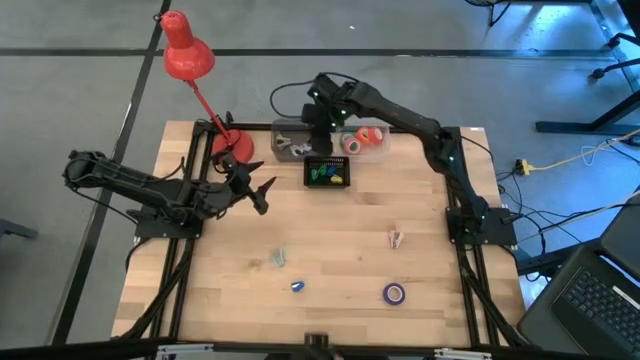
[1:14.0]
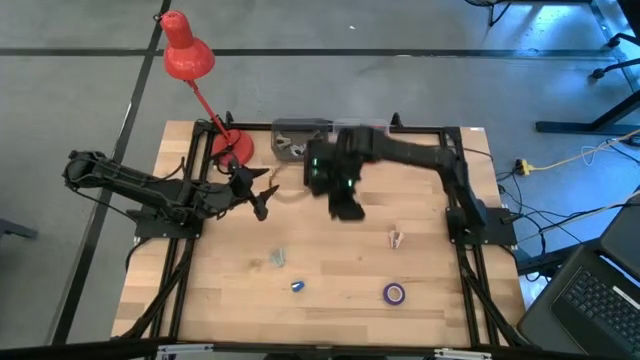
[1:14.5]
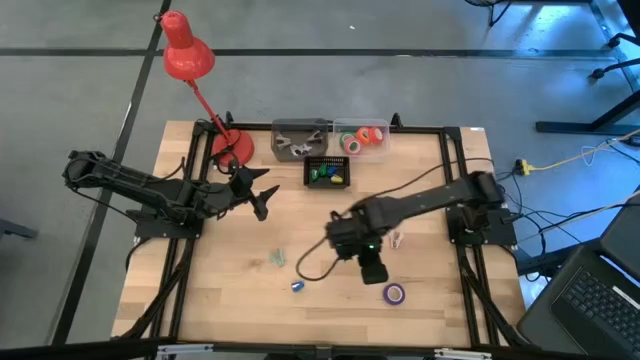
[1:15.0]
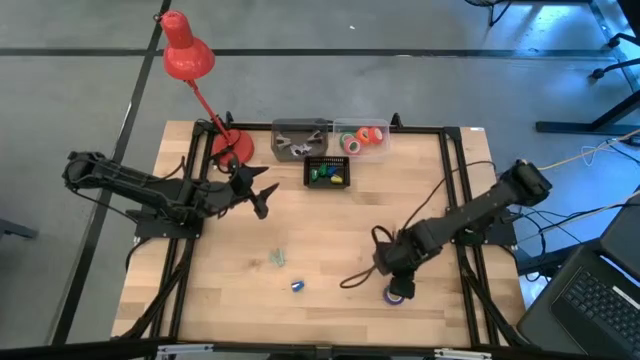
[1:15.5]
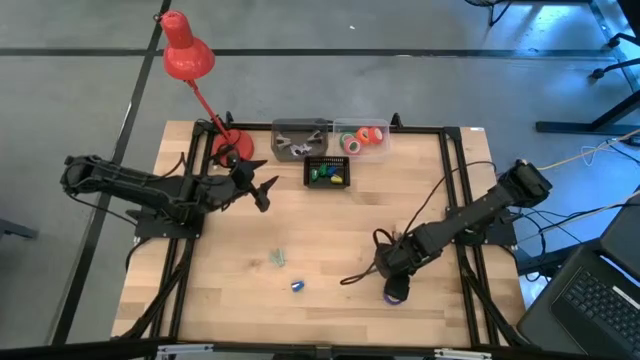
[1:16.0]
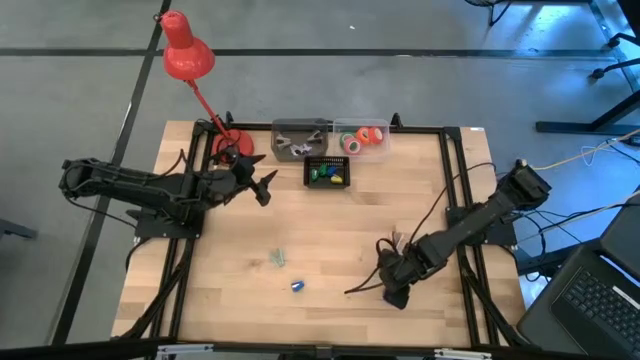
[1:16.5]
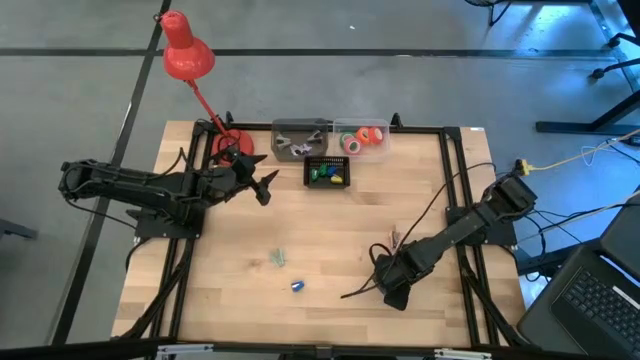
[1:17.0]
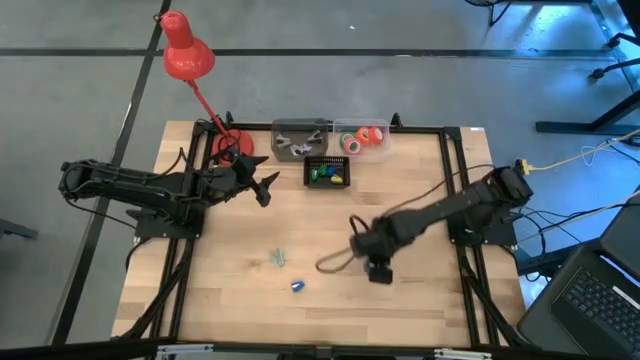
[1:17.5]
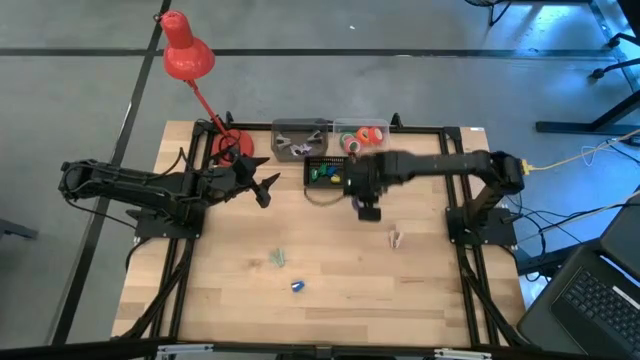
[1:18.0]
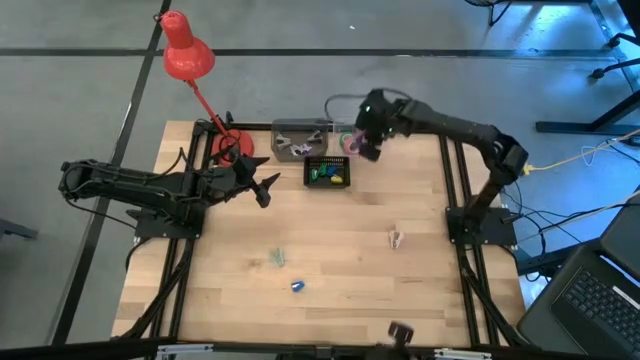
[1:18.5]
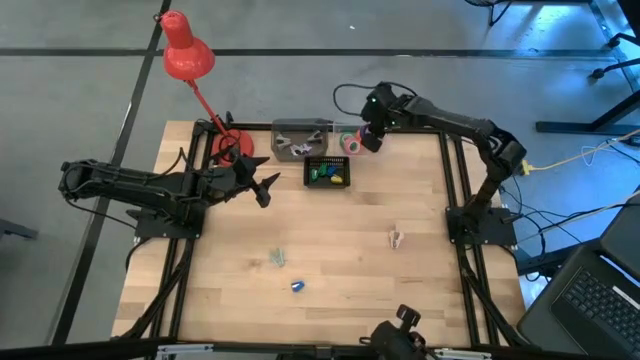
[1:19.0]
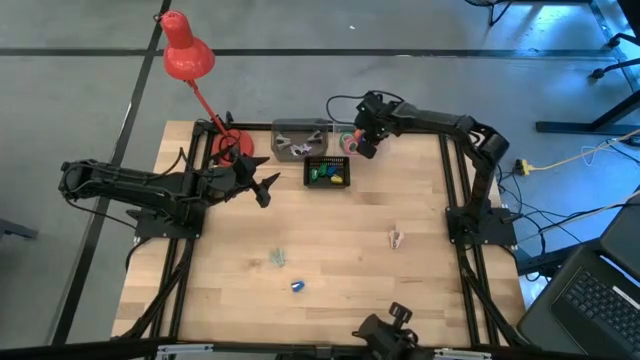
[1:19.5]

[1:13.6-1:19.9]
Task: Pick and place Stapler, Stapler remover, tape
Put the purple tape into the transparent bin

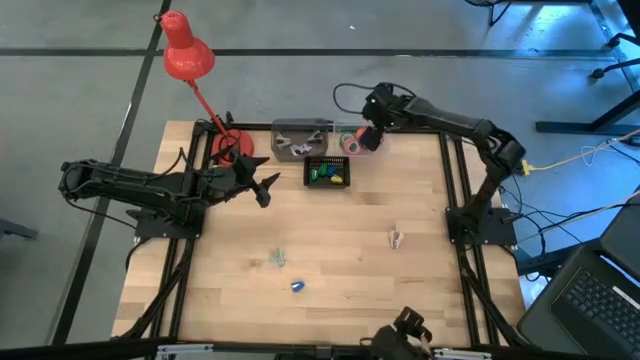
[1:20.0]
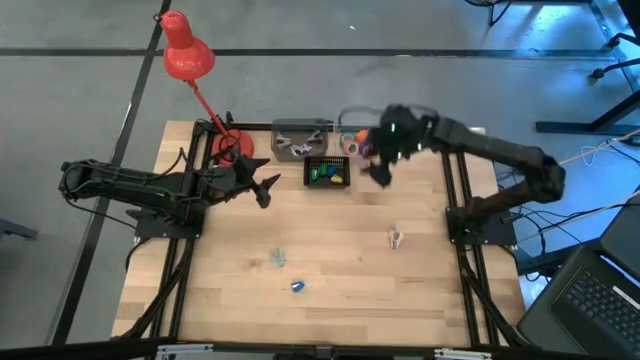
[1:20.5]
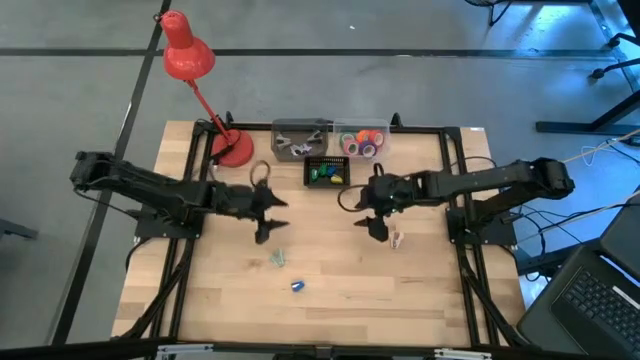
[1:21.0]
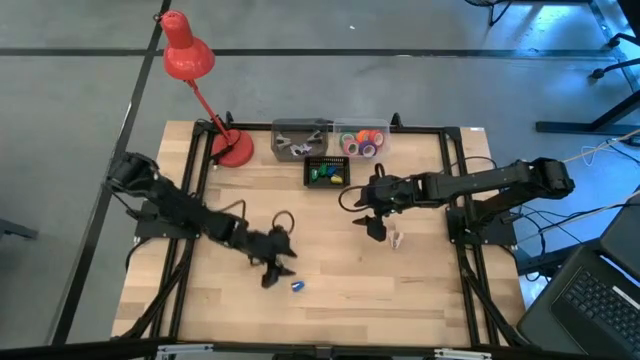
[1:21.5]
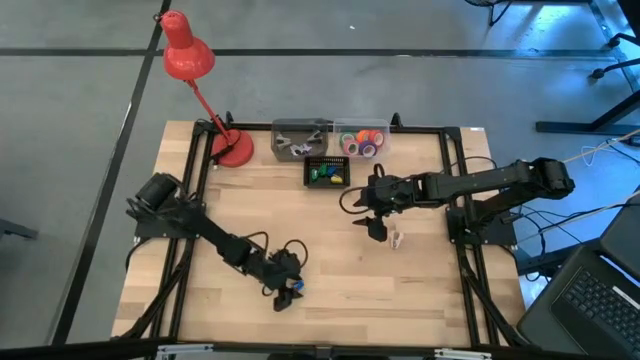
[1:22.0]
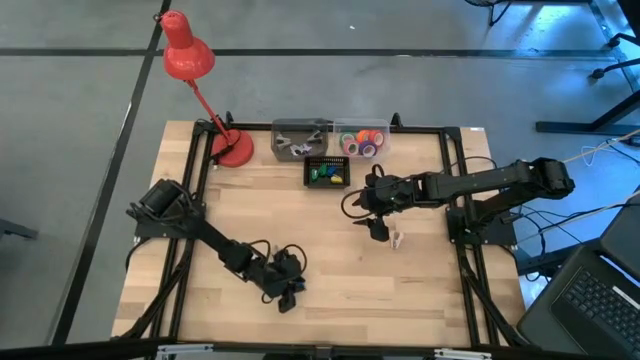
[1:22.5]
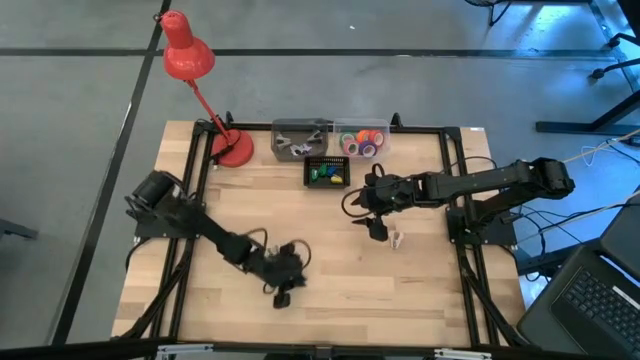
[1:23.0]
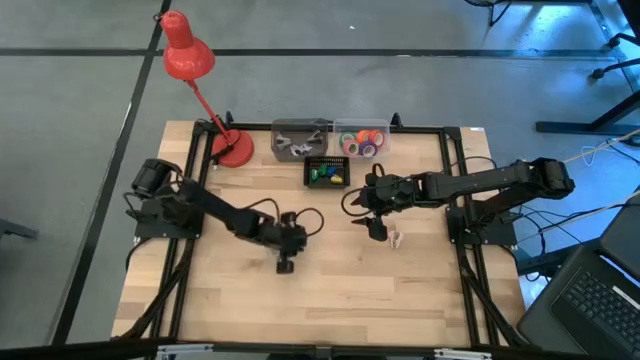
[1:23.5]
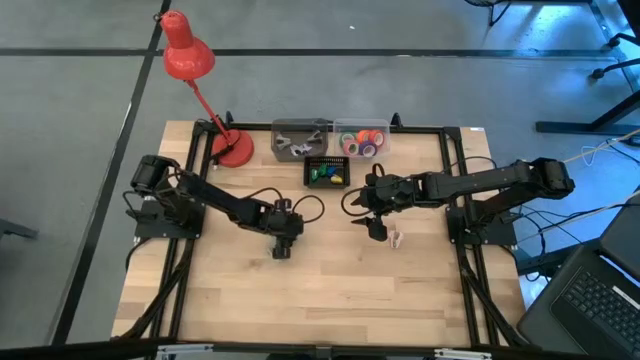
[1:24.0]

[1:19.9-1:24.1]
Put the blue stapler into the black bin

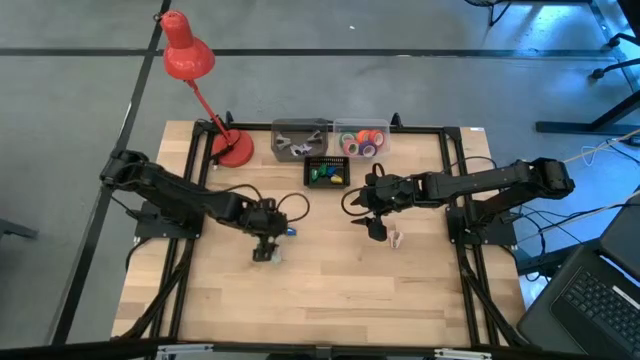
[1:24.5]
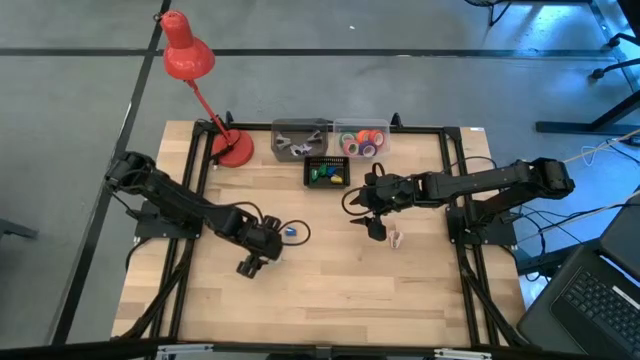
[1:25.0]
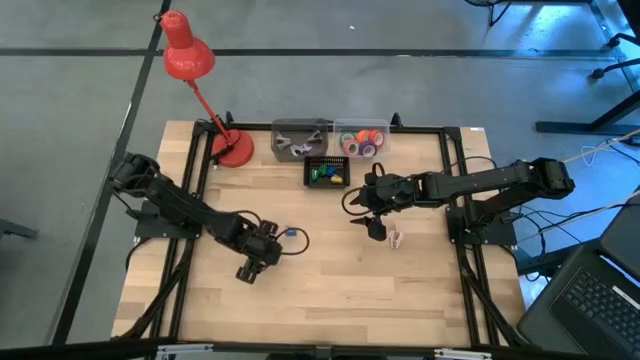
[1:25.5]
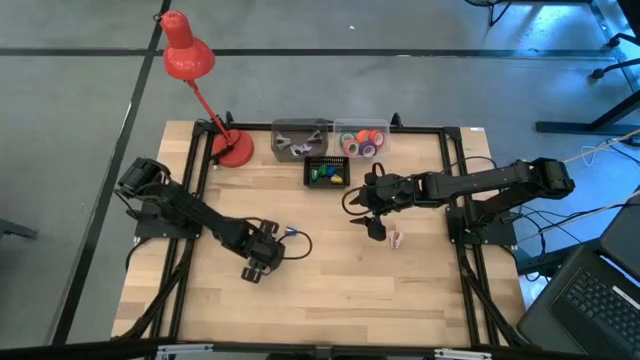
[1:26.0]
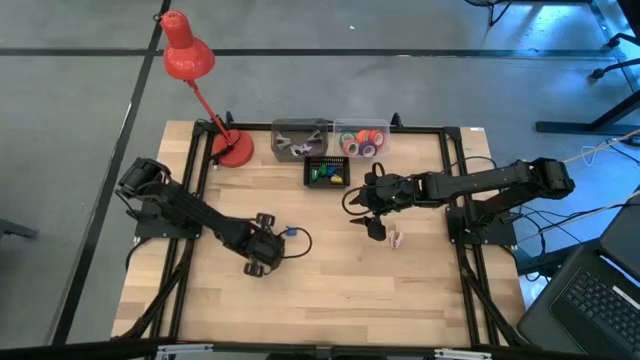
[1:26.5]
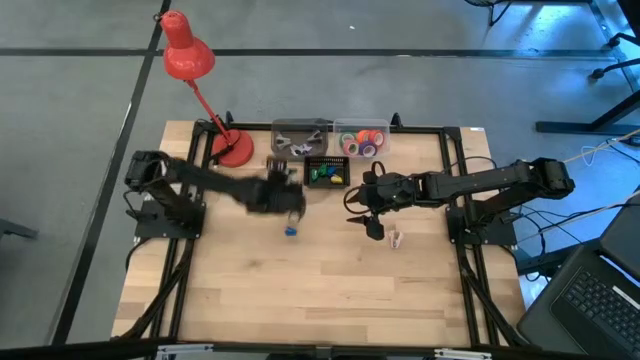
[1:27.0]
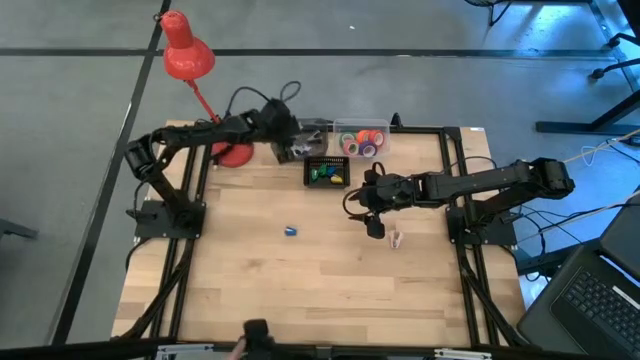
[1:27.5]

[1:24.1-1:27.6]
Put the light blue staple remover into the gray bin

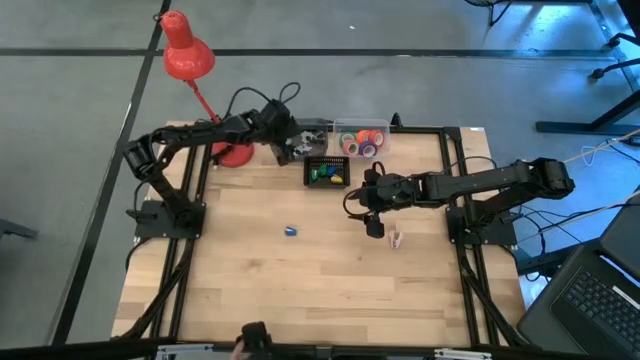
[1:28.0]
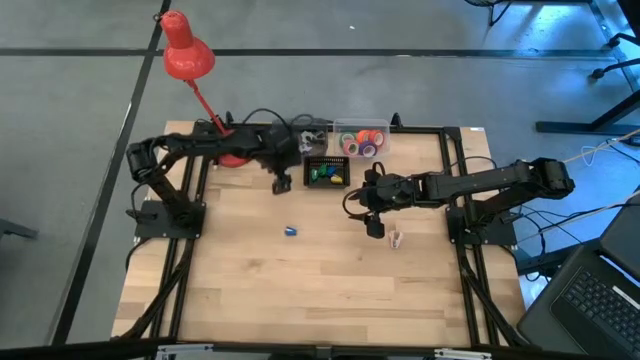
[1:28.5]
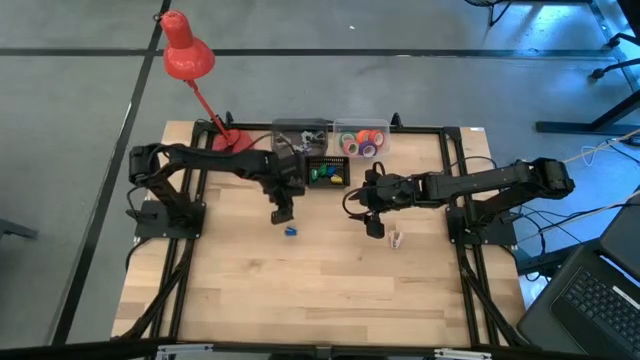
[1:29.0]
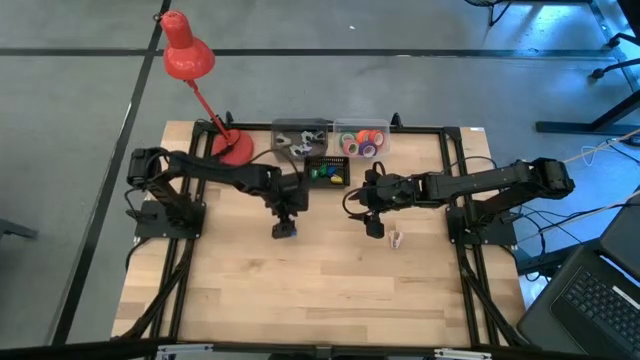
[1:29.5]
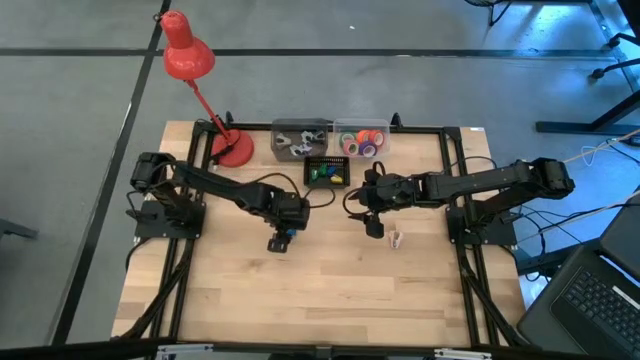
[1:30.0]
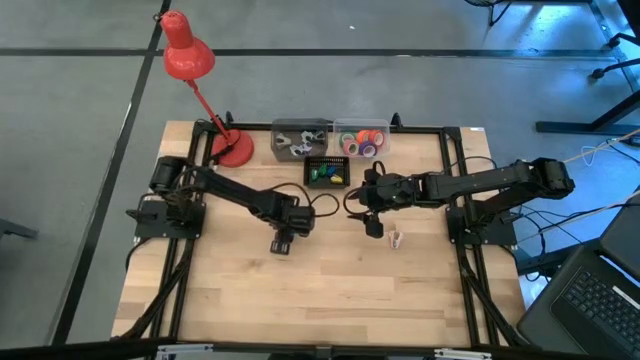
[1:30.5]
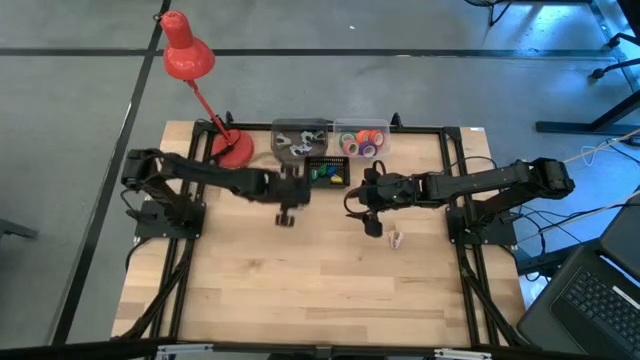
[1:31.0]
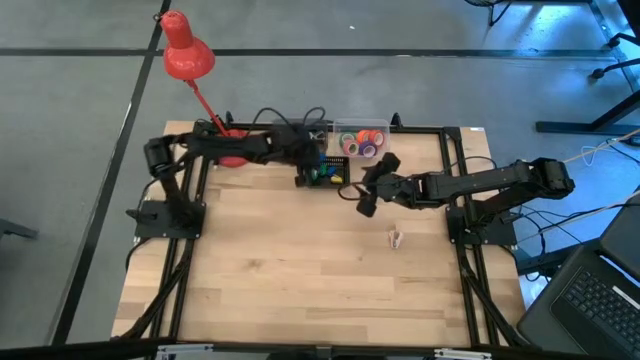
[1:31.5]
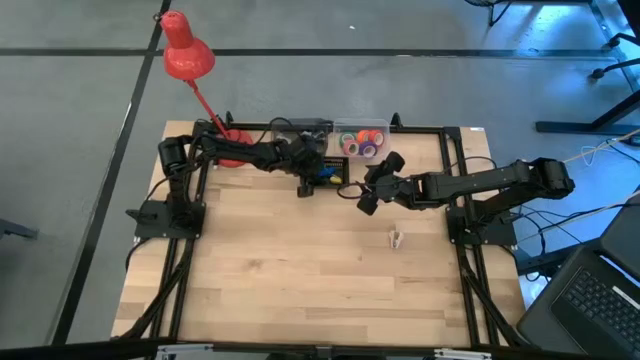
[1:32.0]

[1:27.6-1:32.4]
Put the blue stapler into the black bin

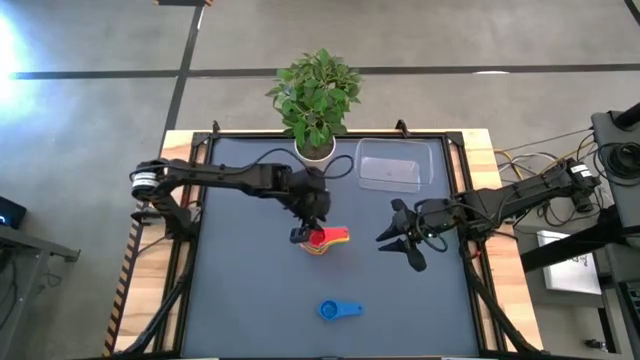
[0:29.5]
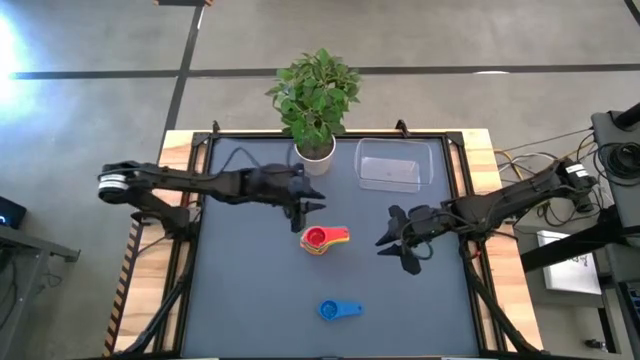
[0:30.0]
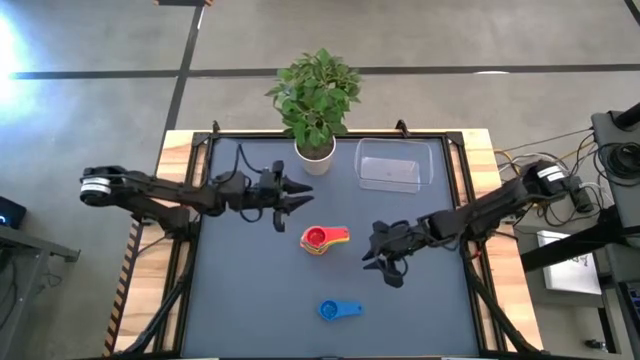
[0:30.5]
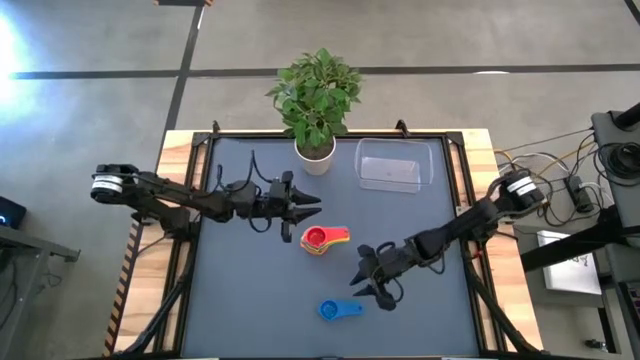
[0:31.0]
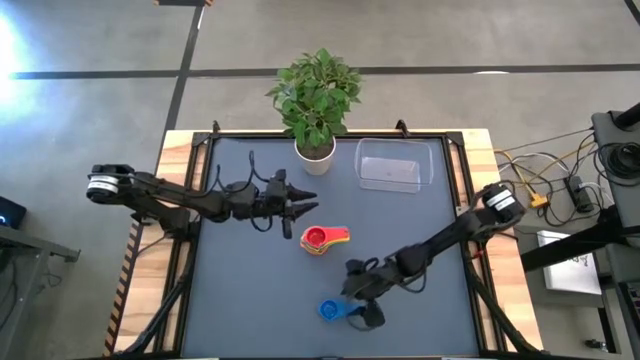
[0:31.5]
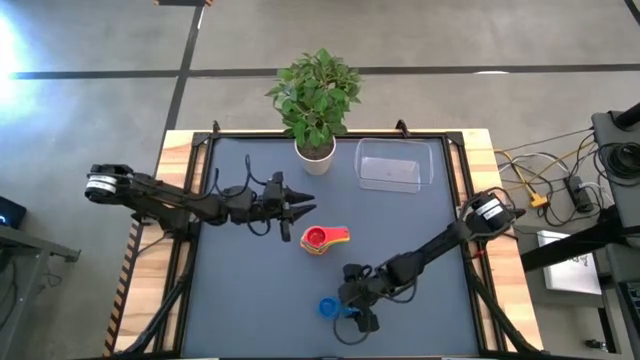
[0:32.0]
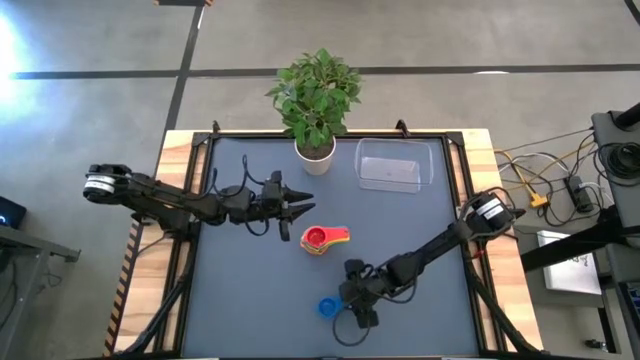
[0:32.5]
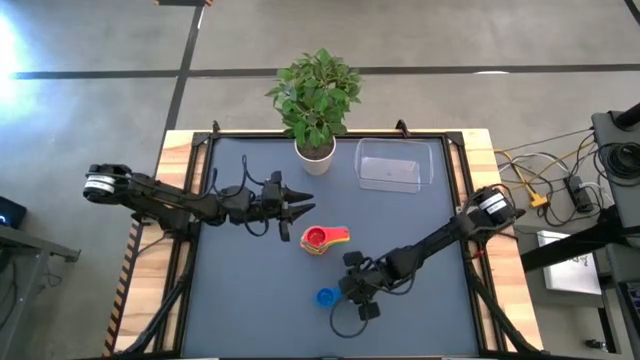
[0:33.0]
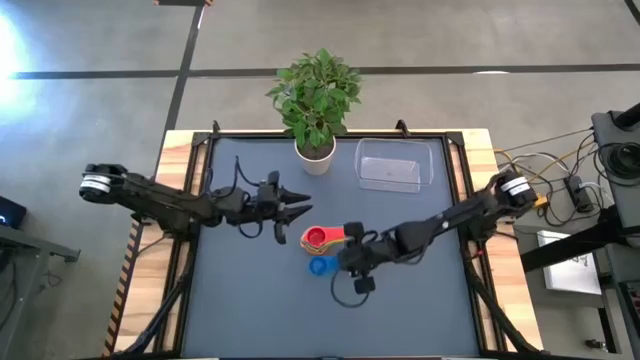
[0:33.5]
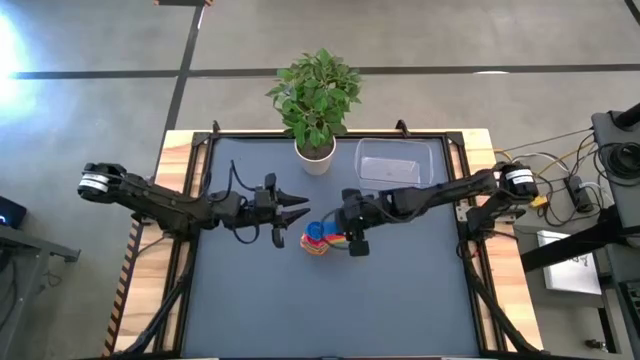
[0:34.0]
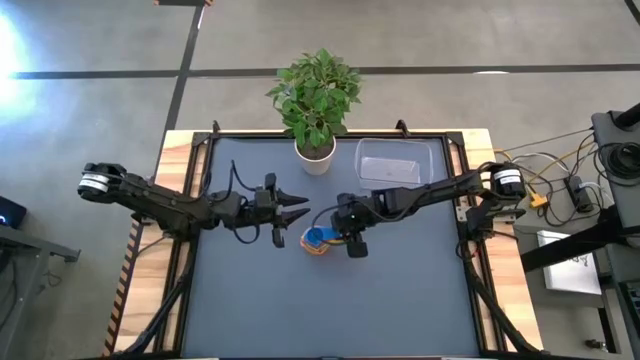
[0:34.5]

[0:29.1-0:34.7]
Task: Nest measuring cups in basket
Stack the blue measuring cup on top of the red measuring cup
